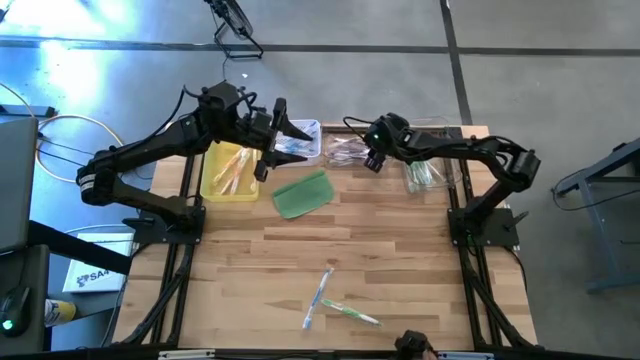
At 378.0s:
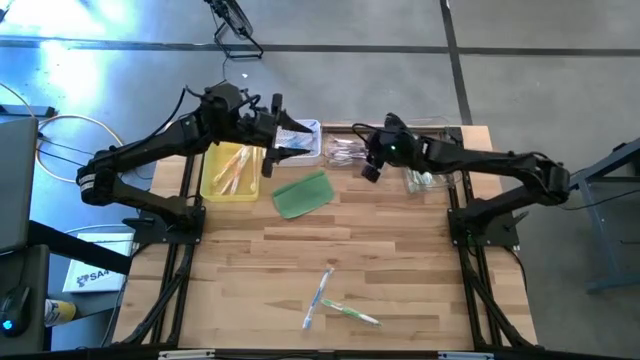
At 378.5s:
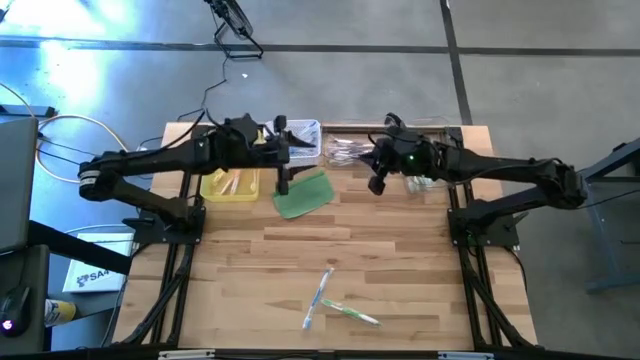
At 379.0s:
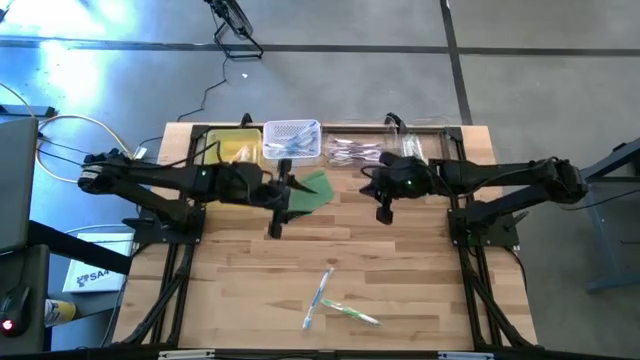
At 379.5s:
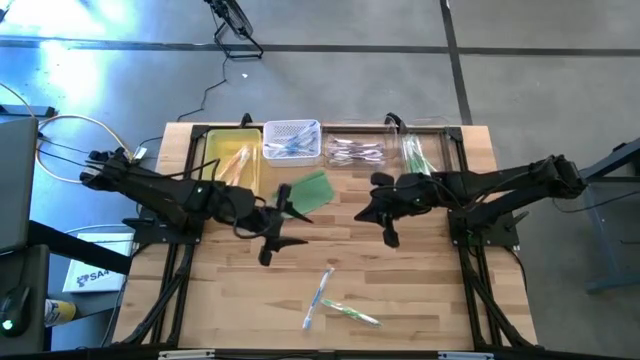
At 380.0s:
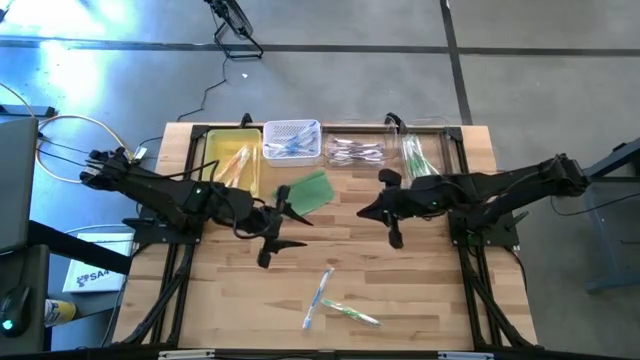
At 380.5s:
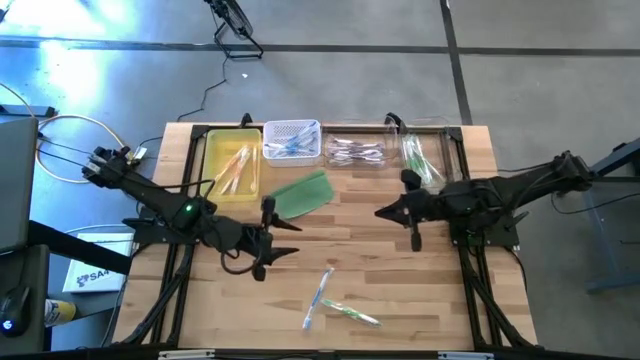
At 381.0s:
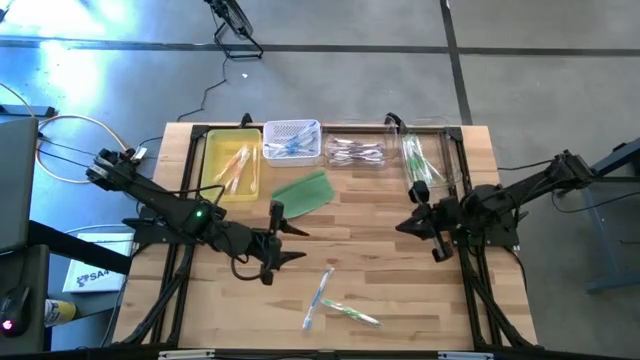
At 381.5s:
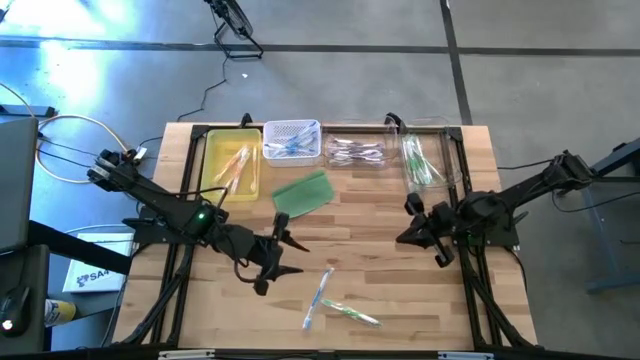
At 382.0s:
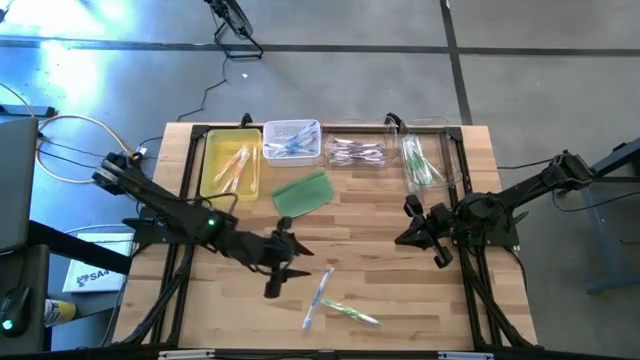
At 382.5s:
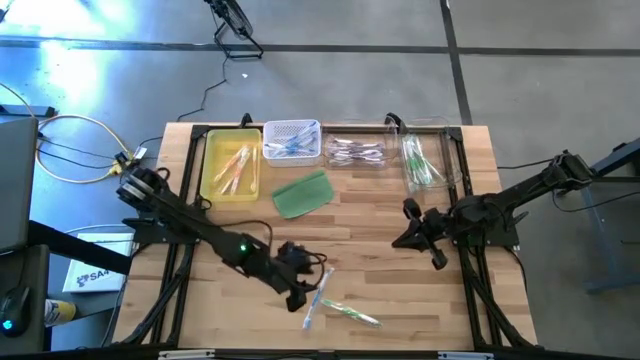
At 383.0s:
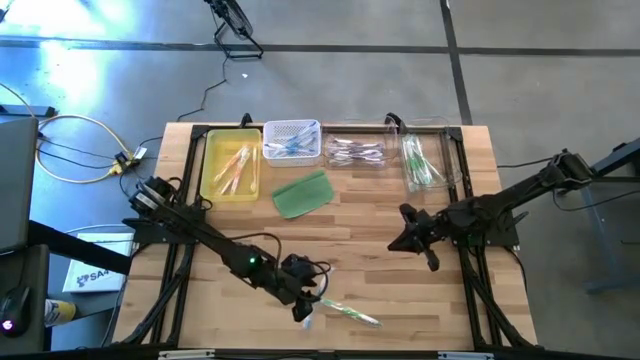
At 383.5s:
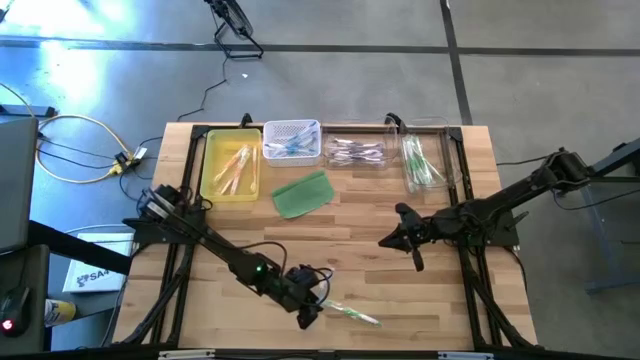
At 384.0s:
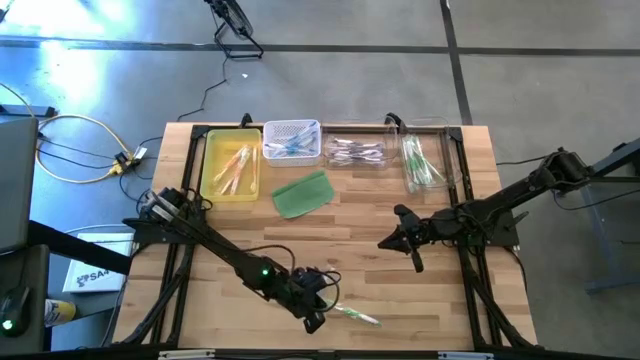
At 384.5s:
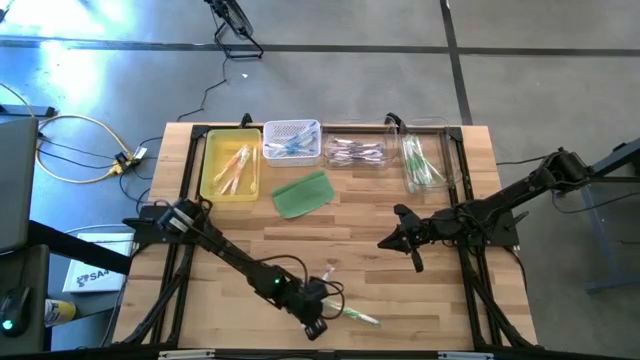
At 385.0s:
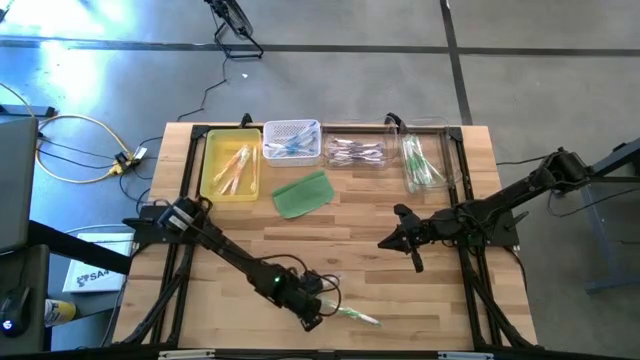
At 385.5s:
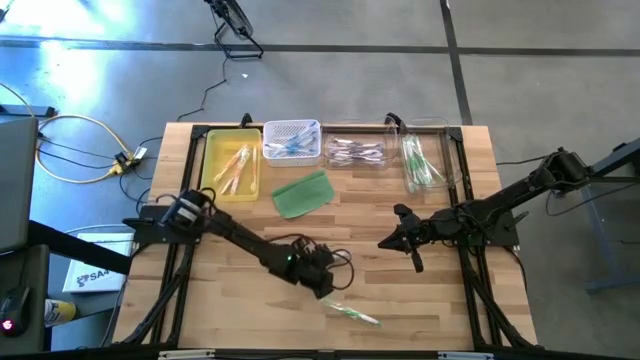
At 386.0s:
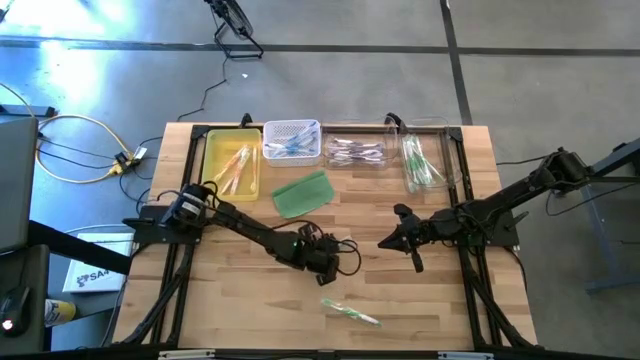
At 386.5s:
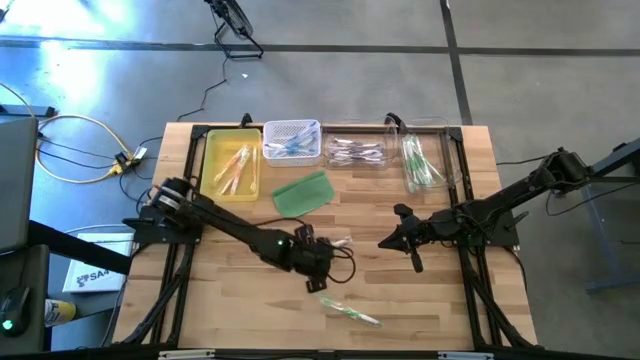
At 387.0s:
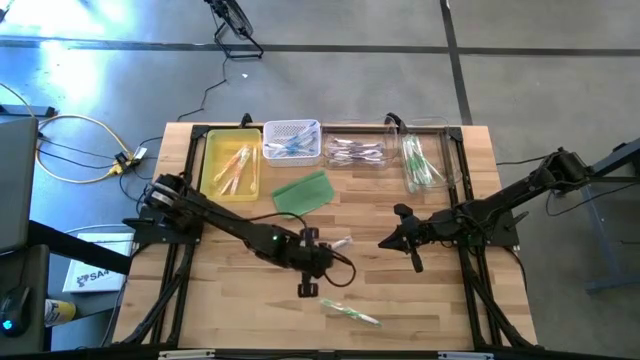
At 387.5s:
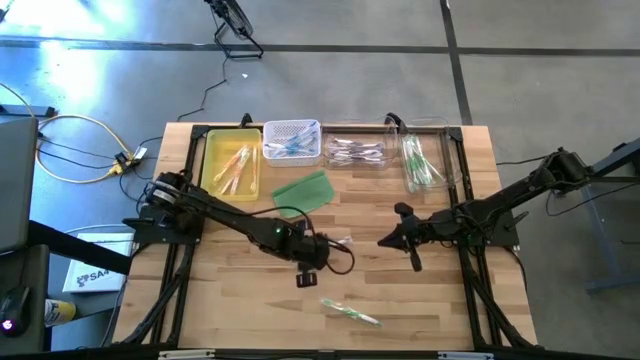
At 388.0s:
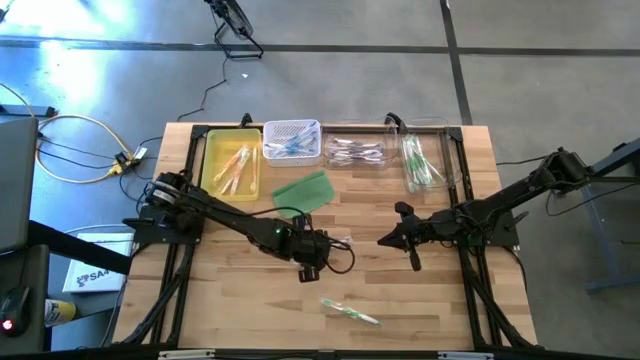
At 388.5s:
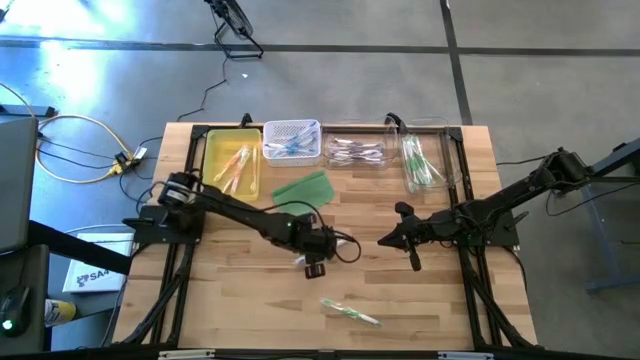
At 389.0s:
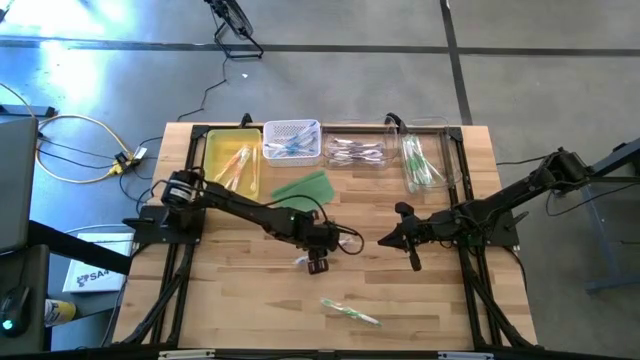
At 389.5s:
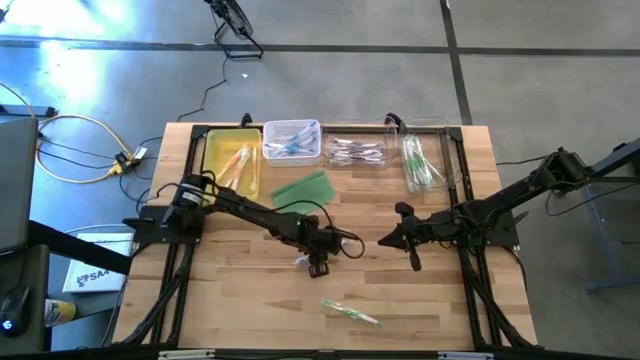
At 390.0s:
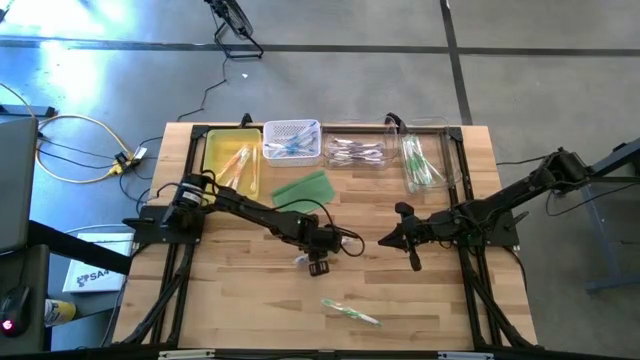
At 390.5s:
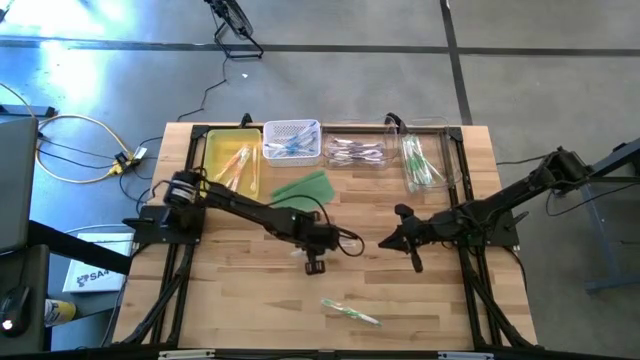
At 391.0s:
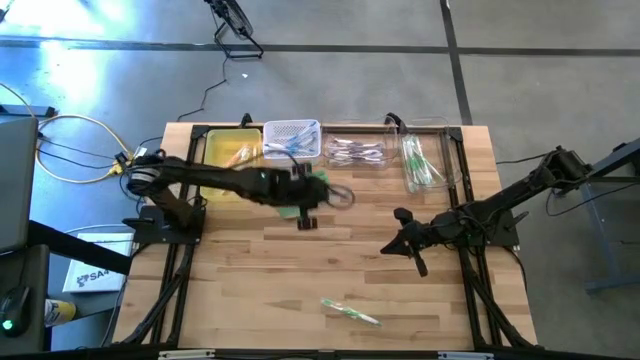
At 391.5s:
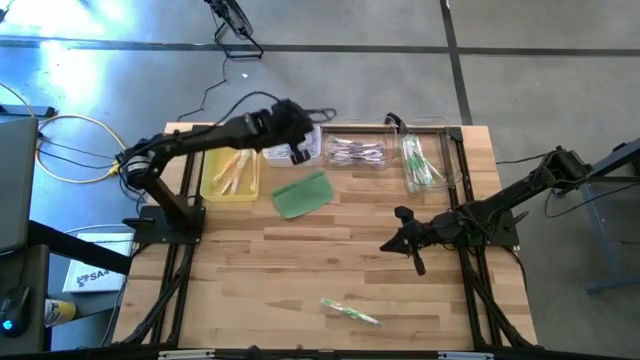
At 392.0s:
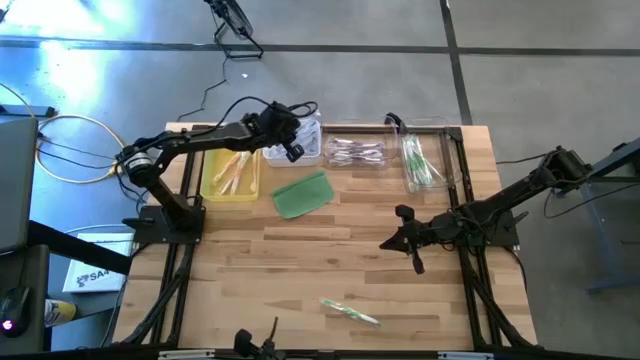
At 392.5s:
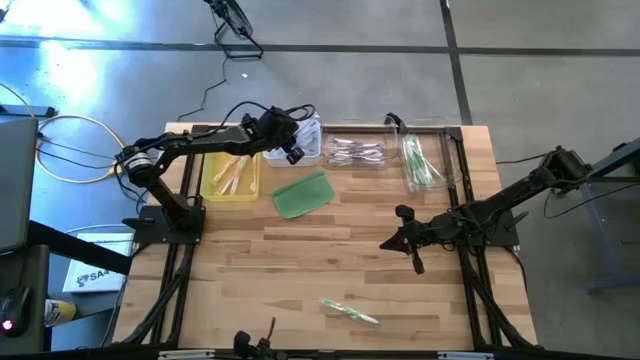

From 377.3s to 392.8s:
Task: Pick & Place Toothbrushes
Put the blue toothbrush into the white bin

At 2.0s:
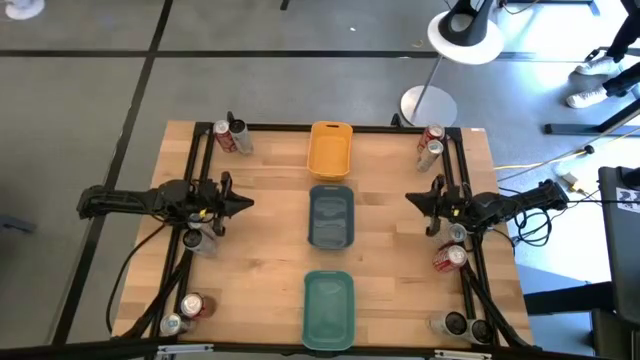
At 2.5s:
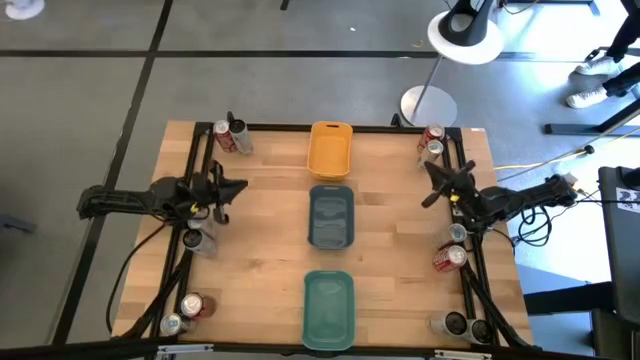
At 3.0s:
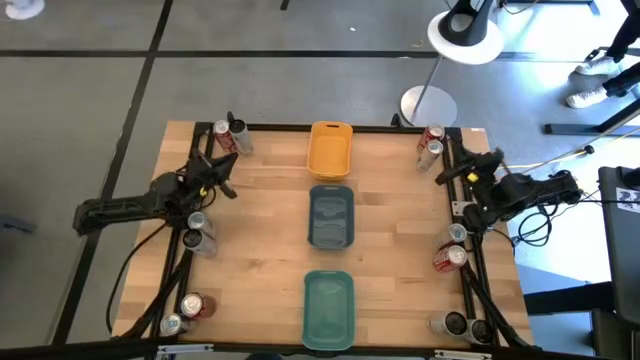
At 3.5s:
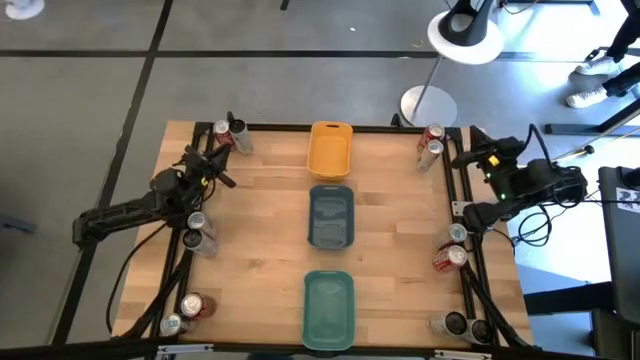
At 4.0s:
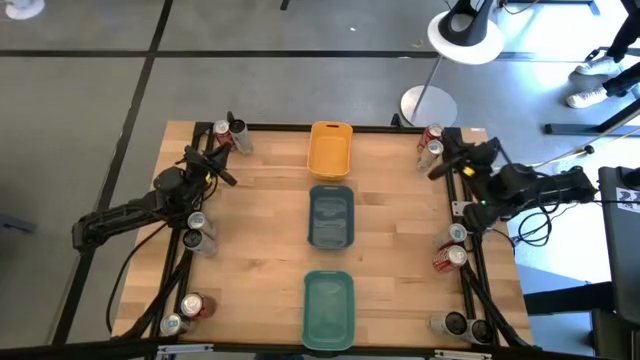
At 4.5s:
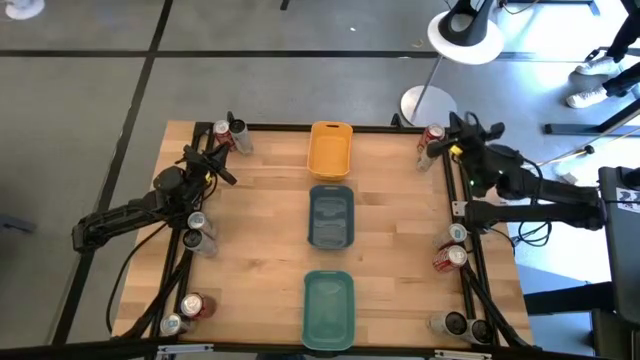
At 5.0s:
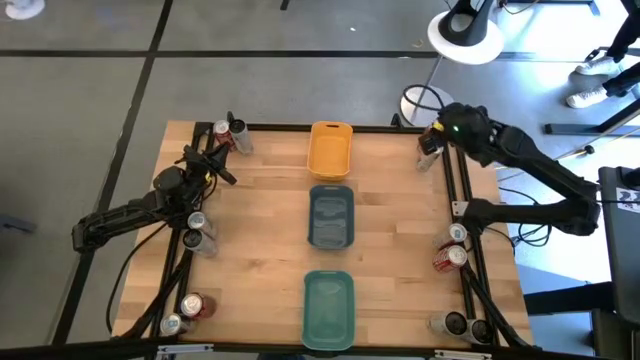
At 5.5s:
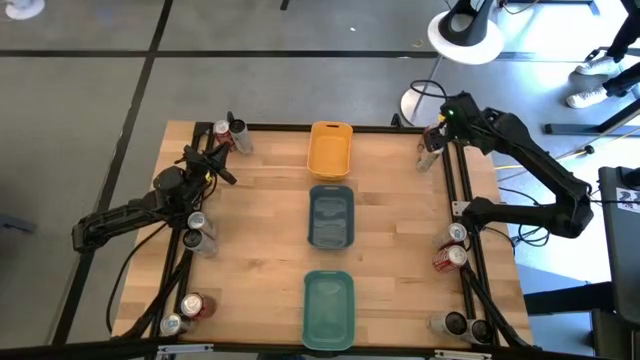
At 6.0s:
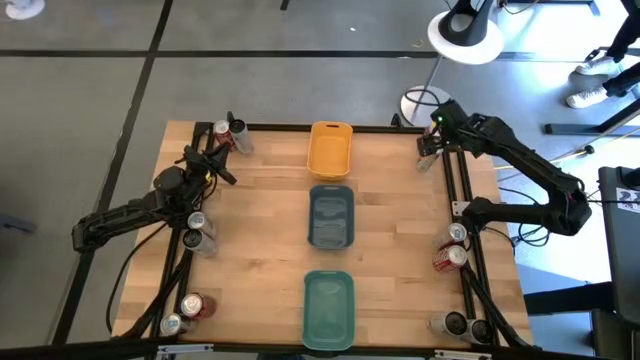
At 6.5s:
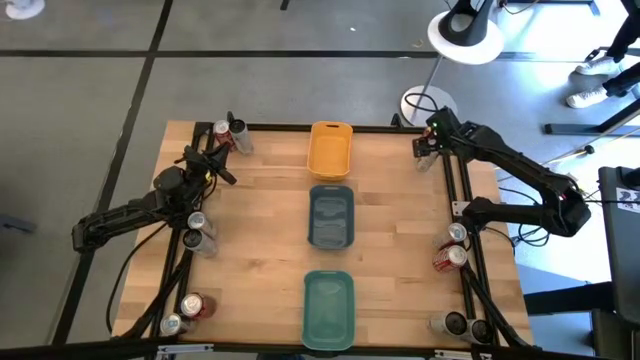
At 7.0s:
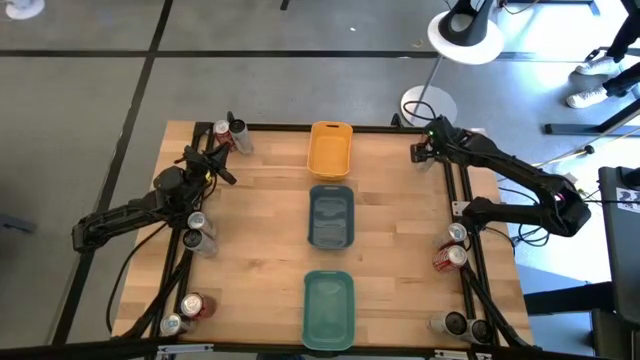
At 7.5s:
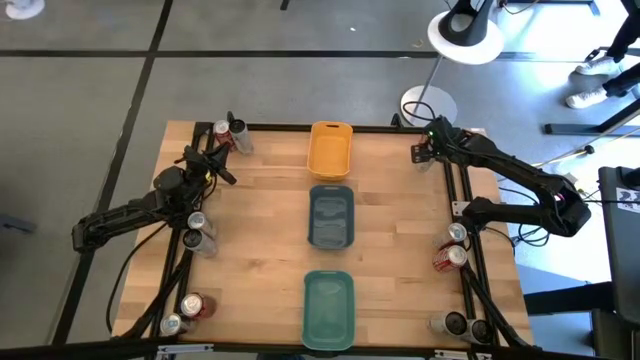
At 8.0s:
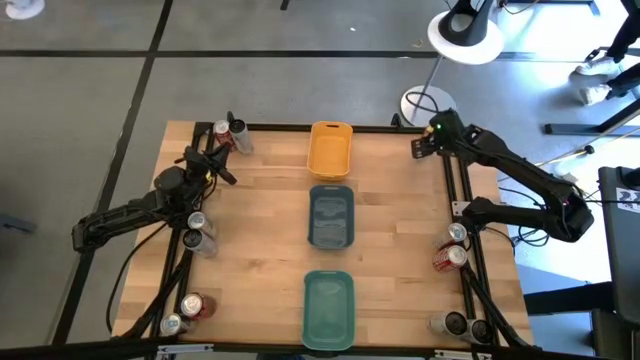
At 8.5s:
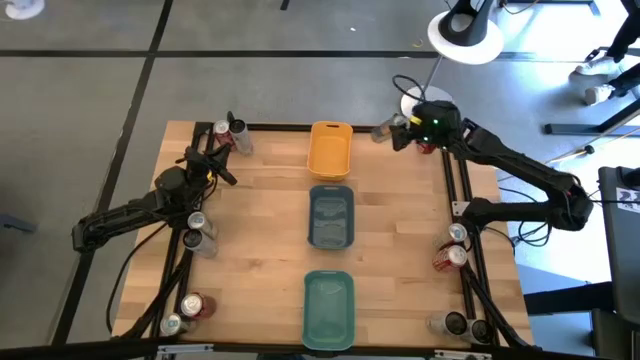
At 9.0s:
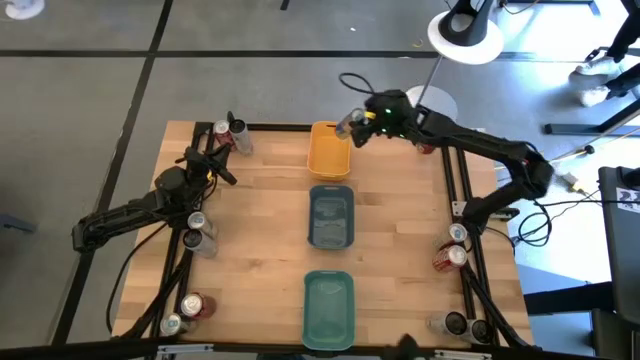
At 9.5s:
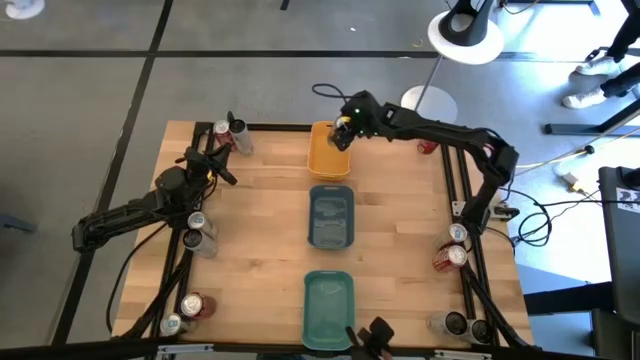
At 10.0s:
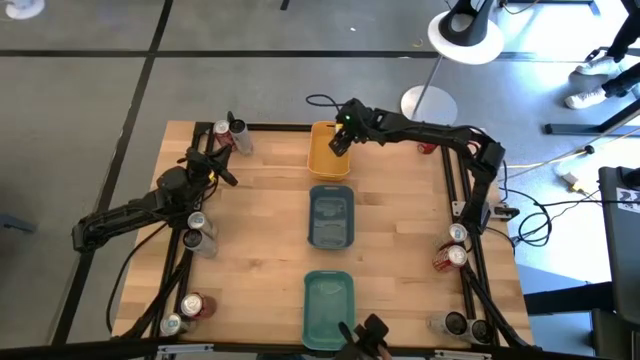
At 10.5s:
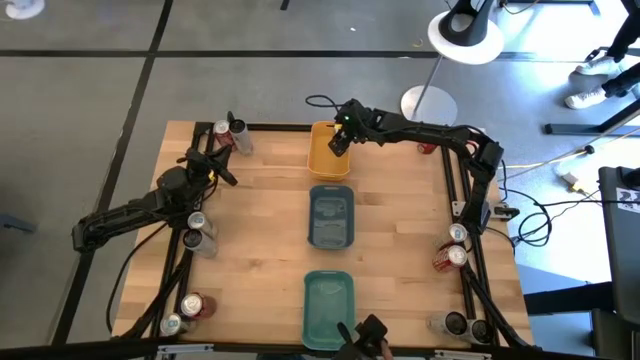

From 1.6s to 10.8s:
Task: Sort soda cans
Put the top blue soda can into the yellow bin
